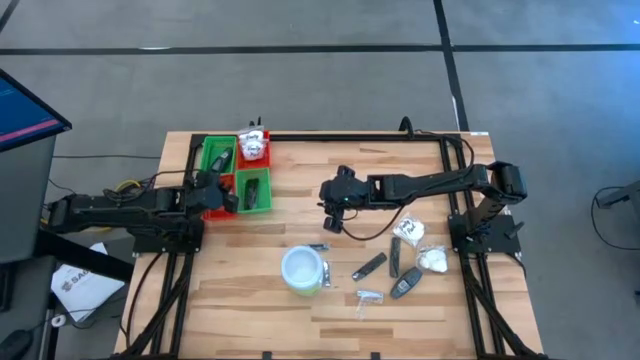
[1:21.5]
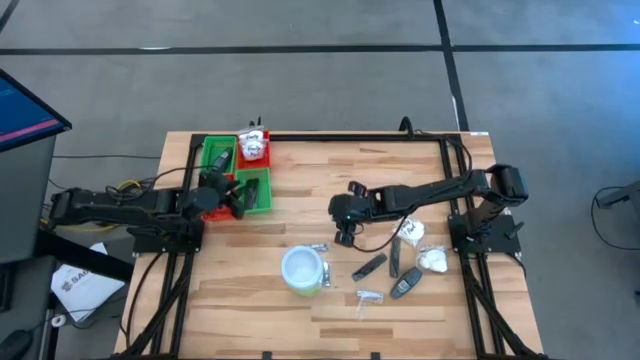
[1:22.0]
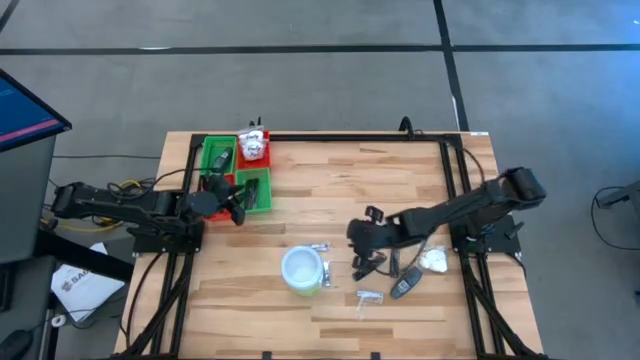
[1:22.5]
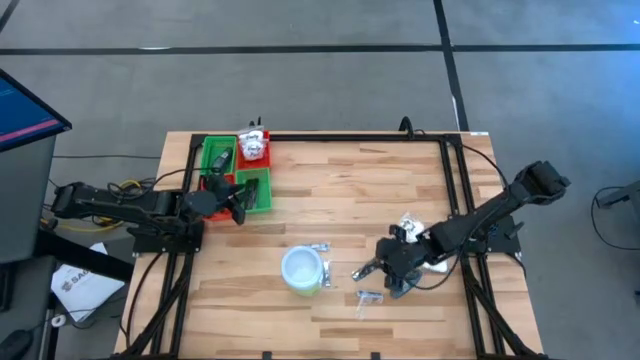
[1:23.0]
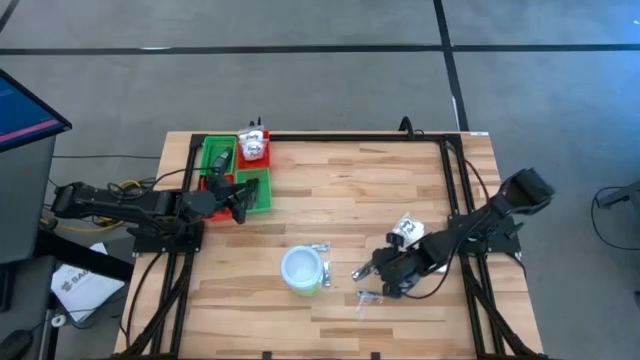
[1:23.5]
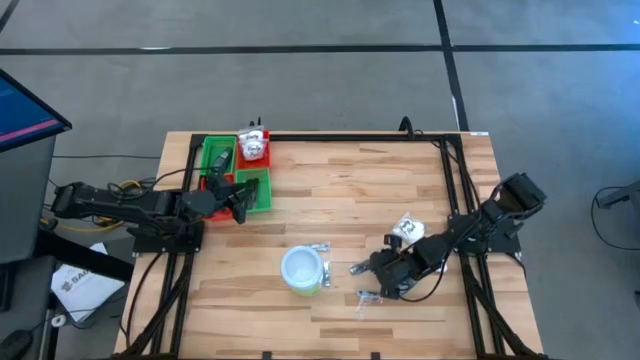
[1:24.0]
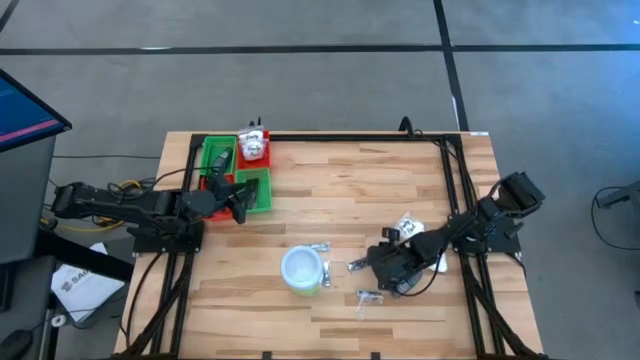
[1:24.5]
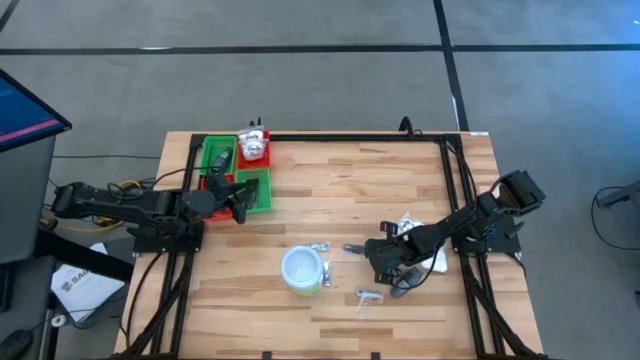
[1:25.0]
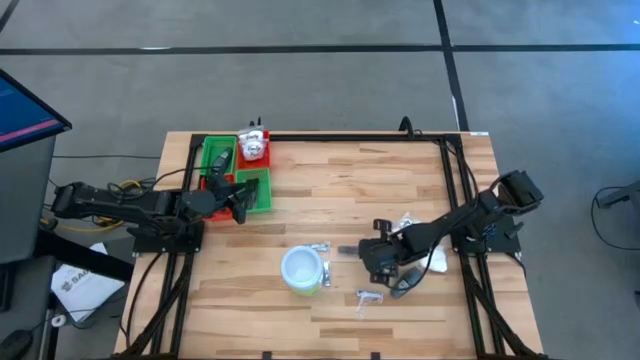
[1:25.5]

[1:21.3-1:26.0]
Task: Pick & Place Travel size toiletries
Put the black comb into the bottom green bin

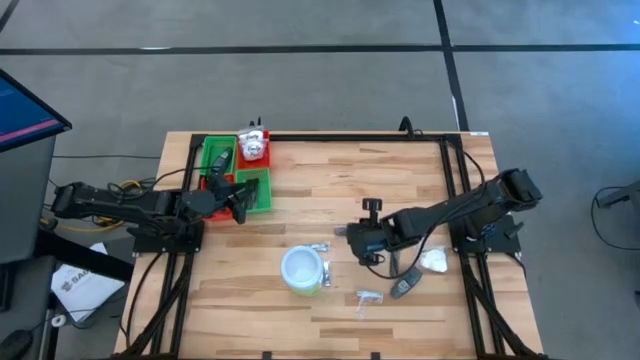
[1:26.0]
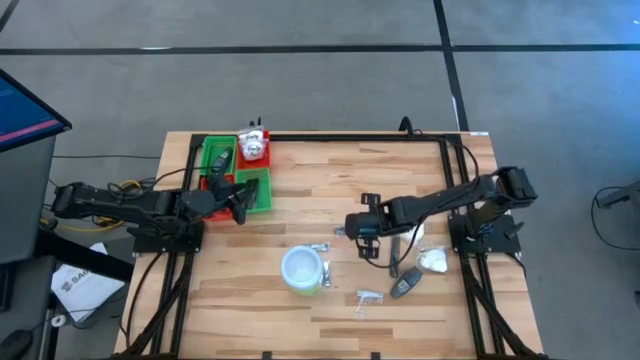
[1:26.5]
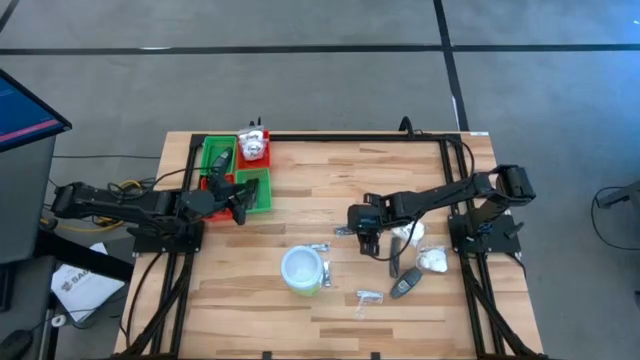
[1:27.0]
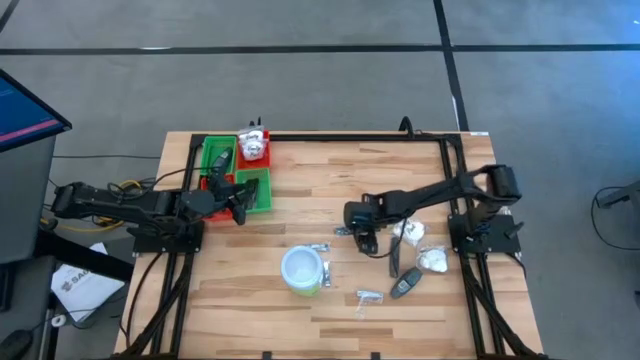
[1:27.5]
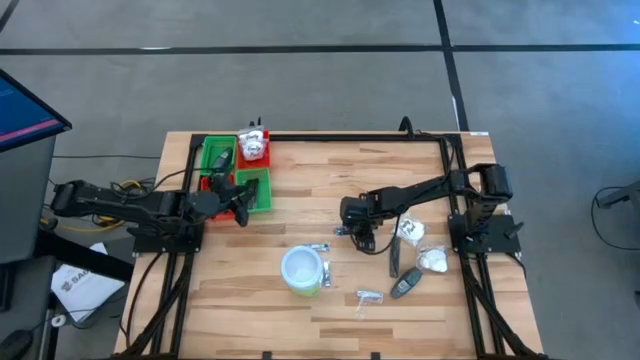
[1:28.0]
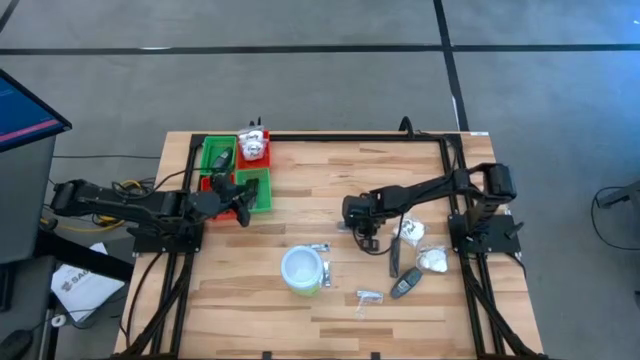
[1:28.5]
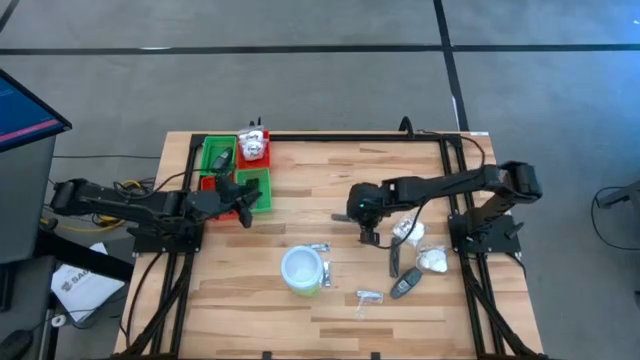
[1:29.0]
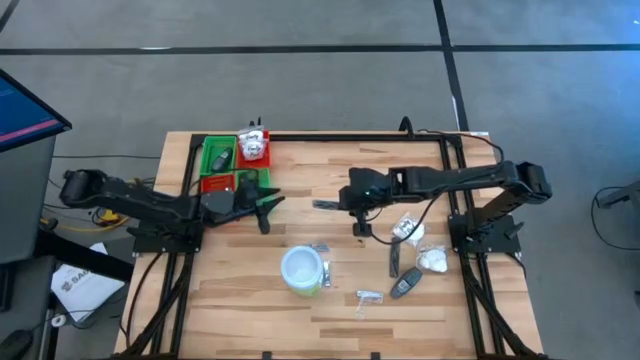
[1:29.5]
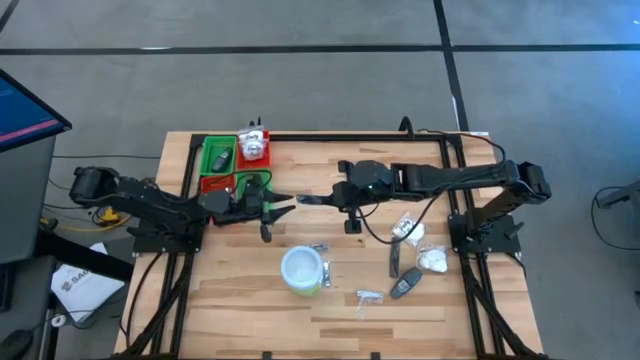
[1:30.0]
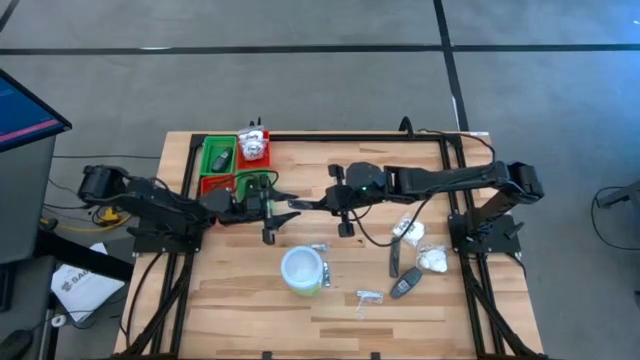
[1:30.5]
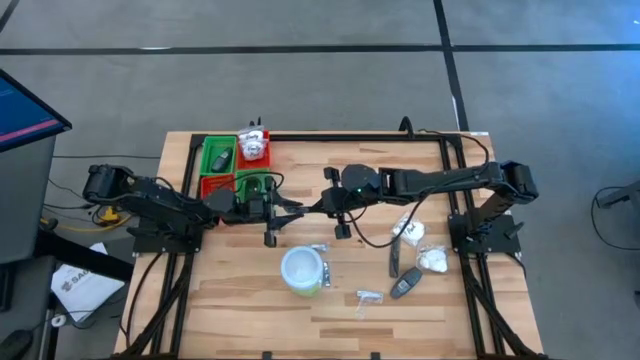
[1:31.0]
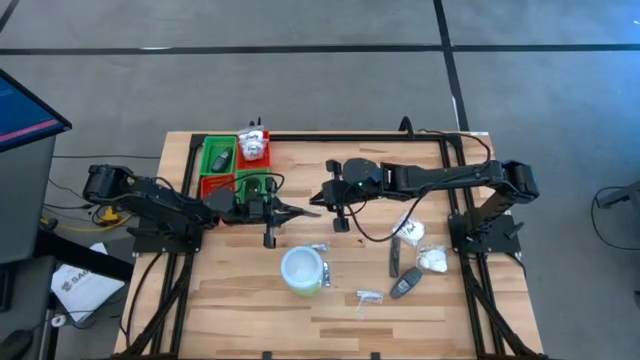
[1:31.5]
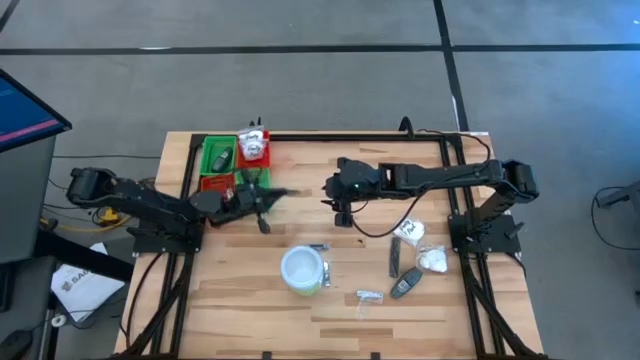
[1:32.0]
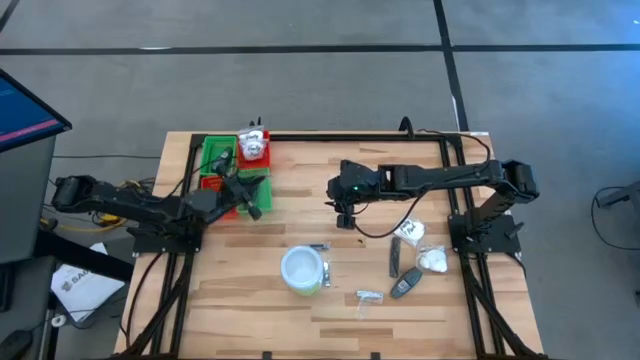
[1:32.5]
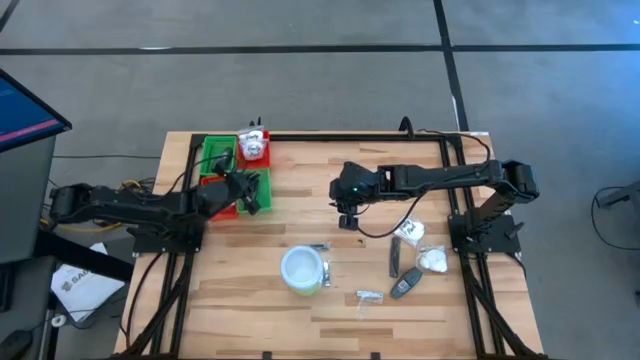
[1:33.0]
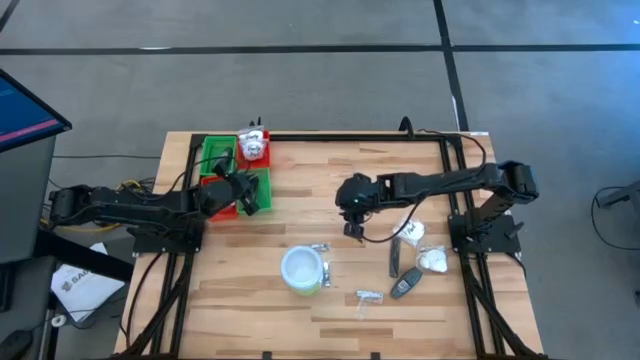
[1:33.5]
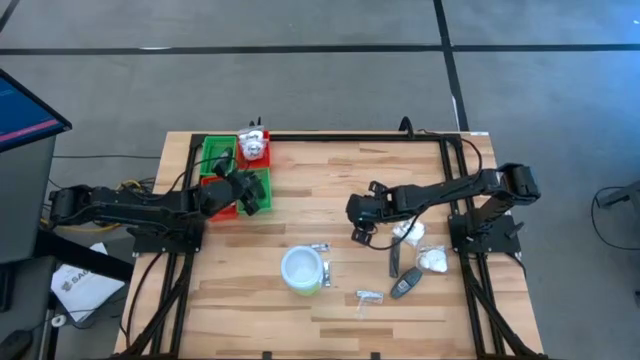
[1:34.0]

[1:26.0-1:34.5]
Put the black comb into the bottom green bin

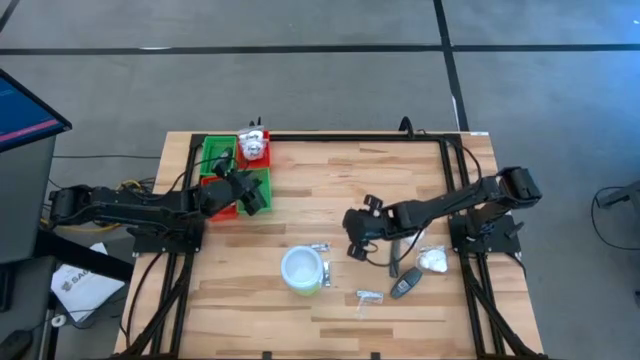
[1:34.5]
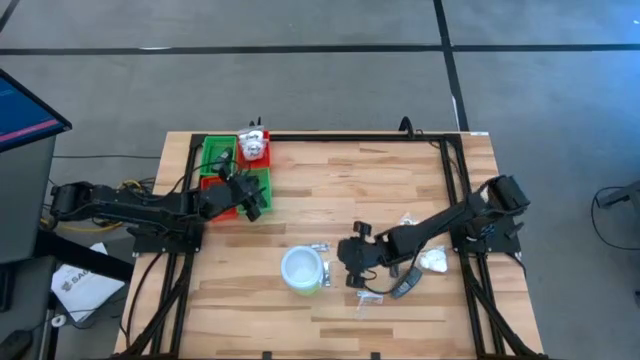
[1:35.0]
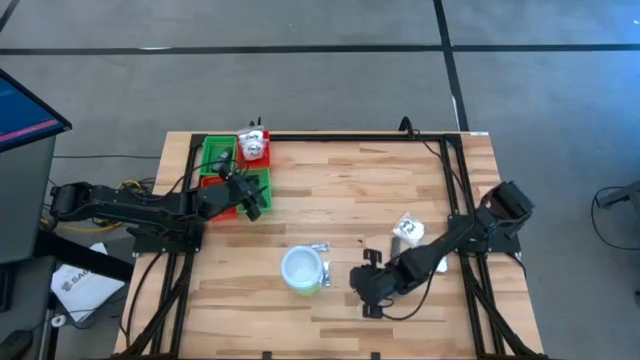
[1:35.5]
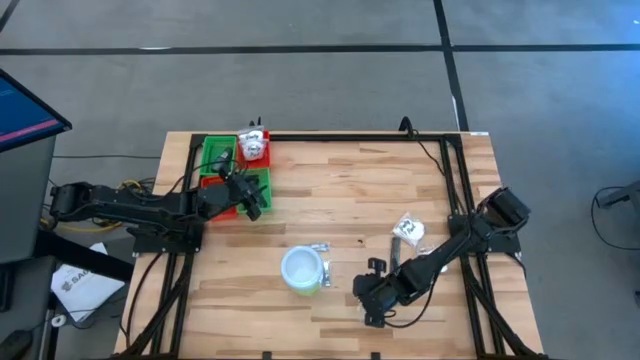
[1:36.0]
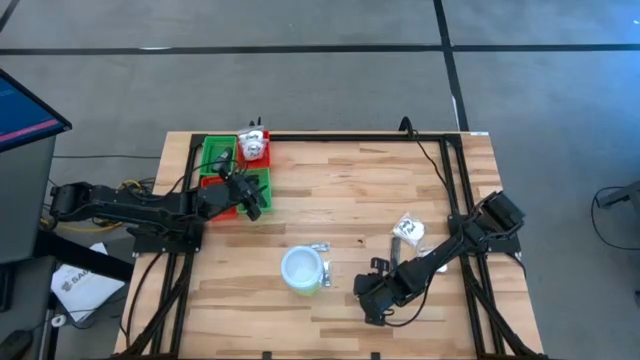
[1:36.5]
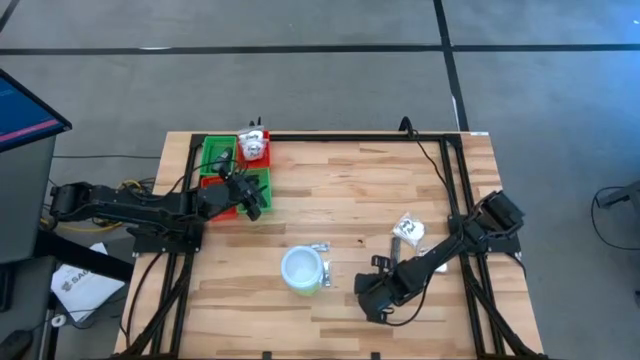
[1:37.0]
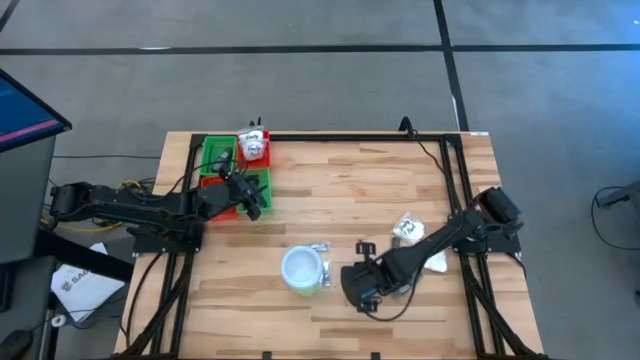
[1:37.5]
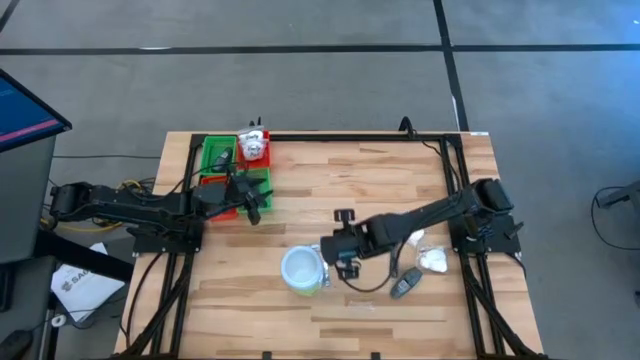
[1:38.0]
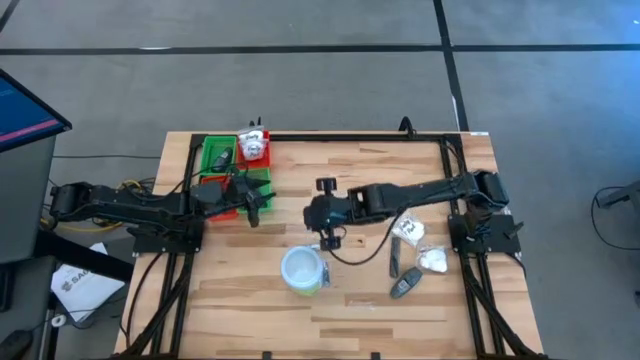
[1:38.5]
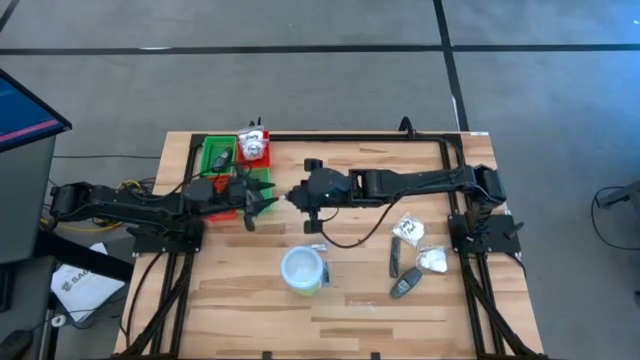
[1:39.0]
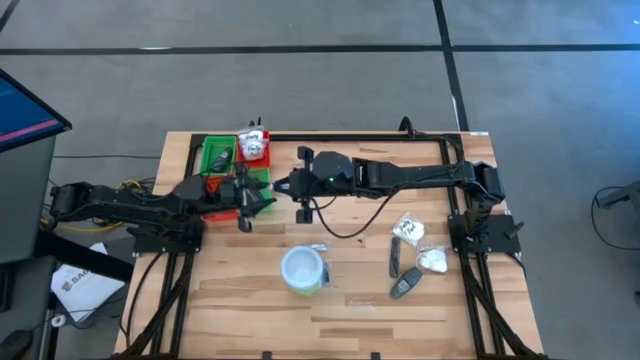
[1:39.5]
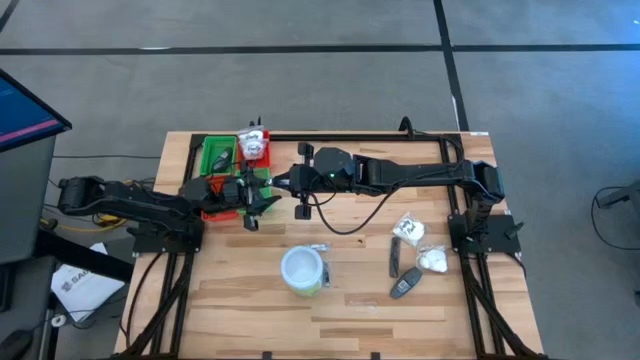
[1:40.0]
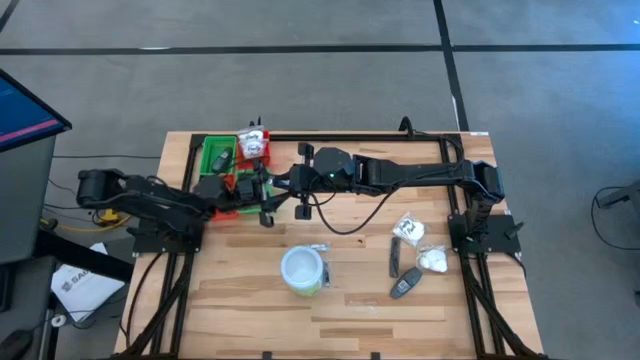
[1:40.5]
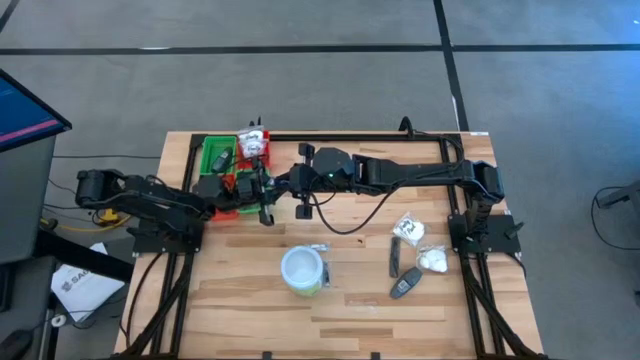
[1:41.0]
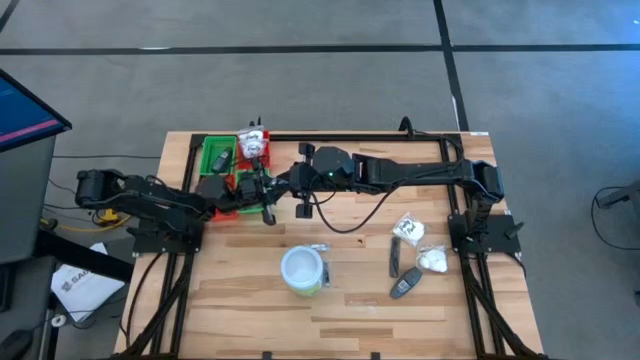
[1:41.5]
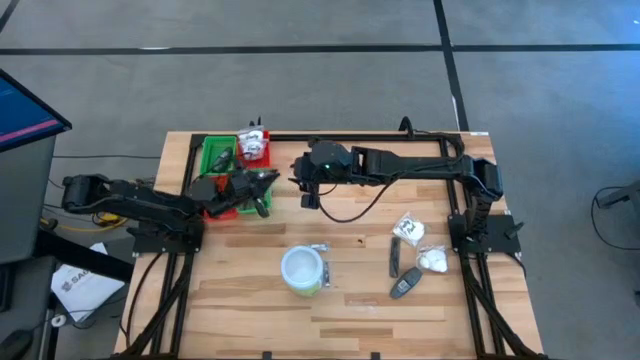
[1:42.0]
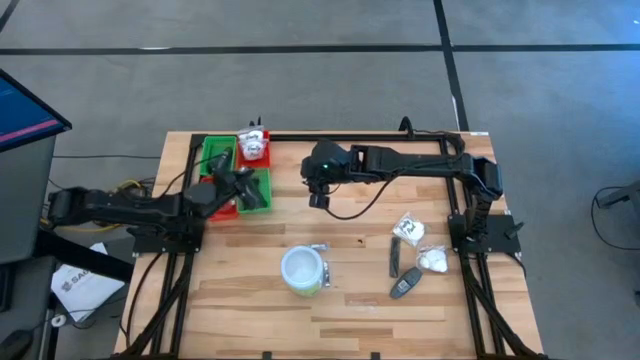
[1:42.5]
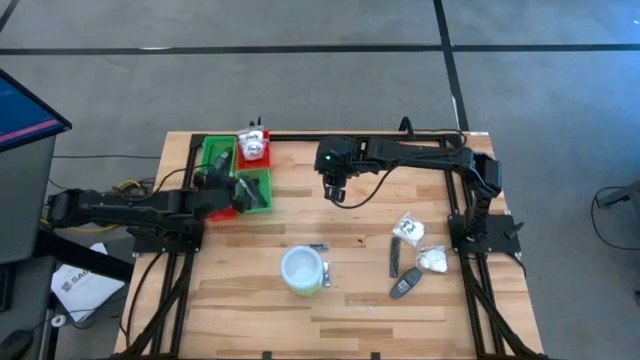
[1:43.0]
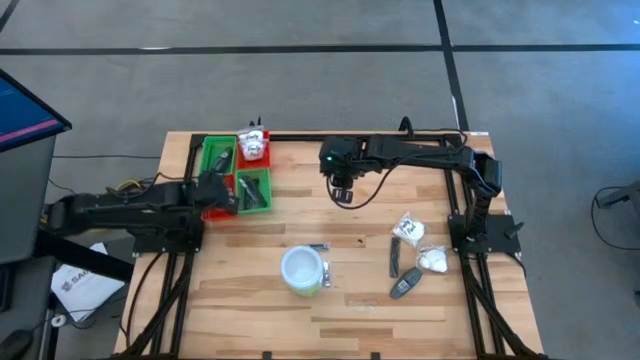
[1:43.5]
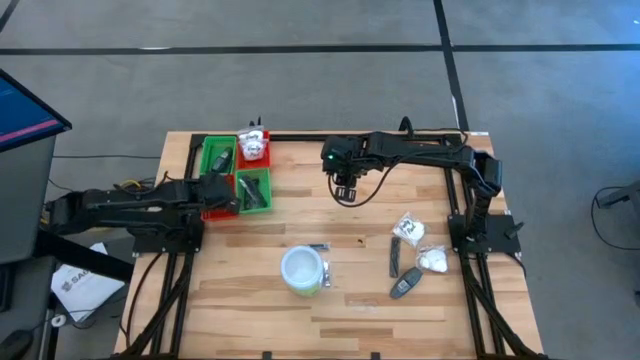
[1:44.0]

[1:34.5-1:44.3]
Put the silver nail cutter into the bottom red bin
